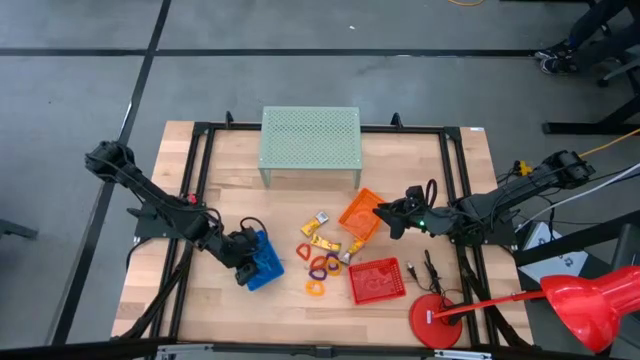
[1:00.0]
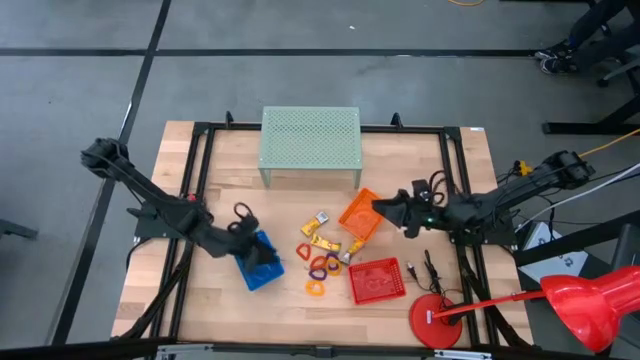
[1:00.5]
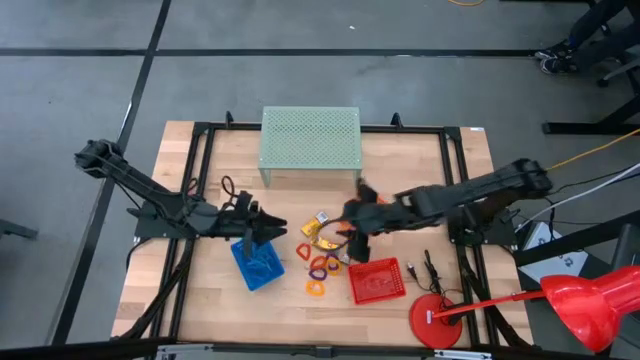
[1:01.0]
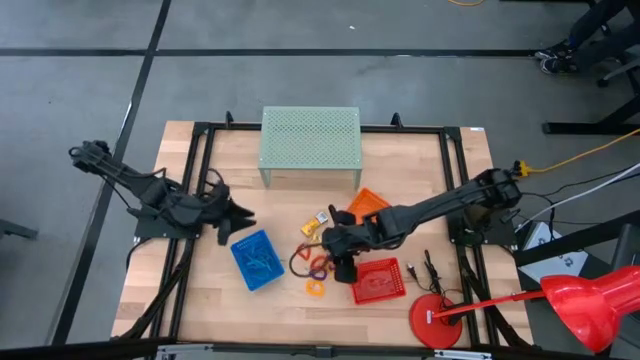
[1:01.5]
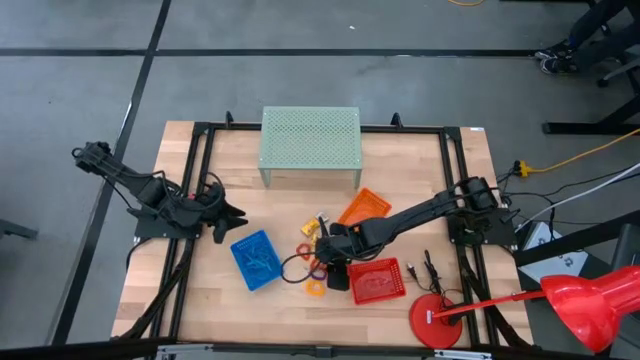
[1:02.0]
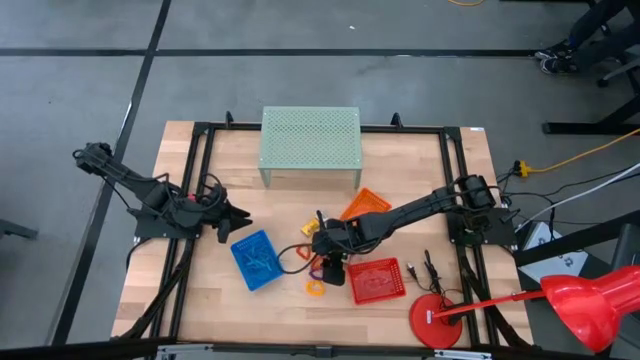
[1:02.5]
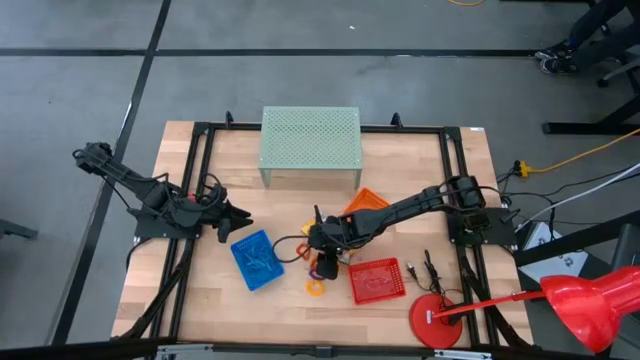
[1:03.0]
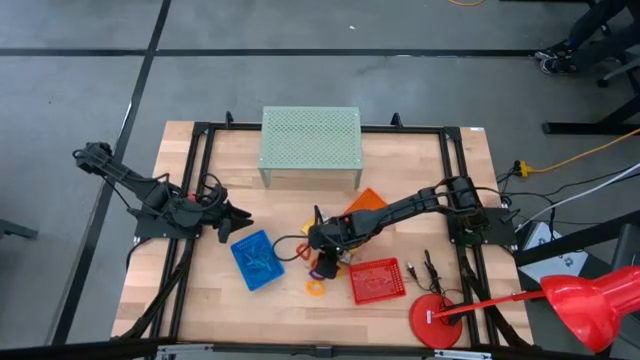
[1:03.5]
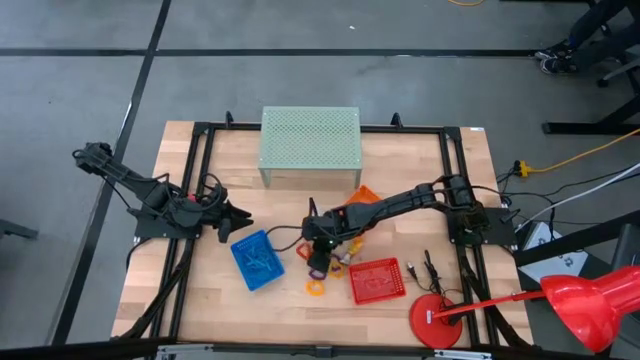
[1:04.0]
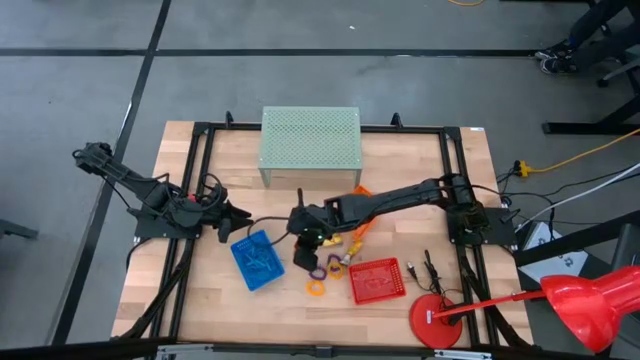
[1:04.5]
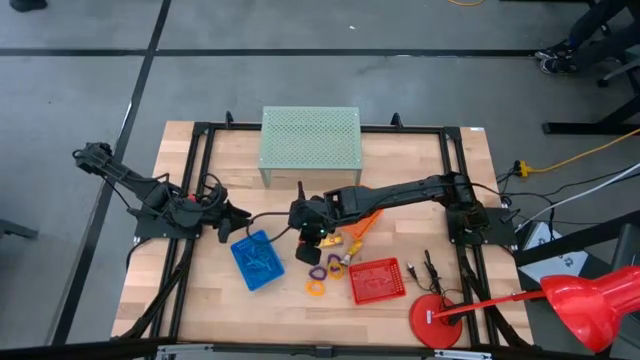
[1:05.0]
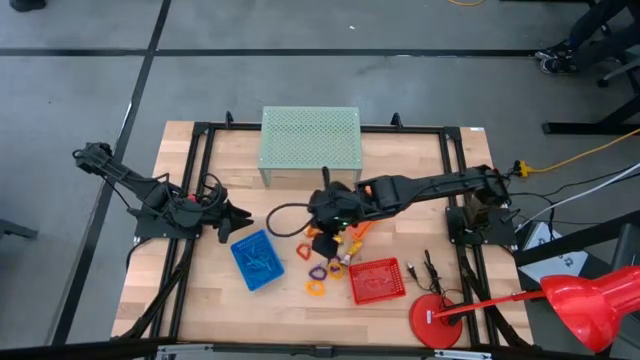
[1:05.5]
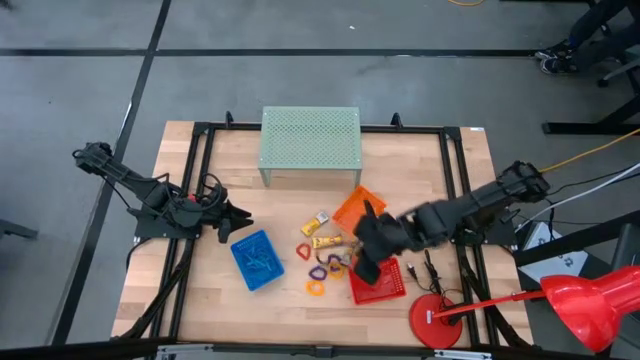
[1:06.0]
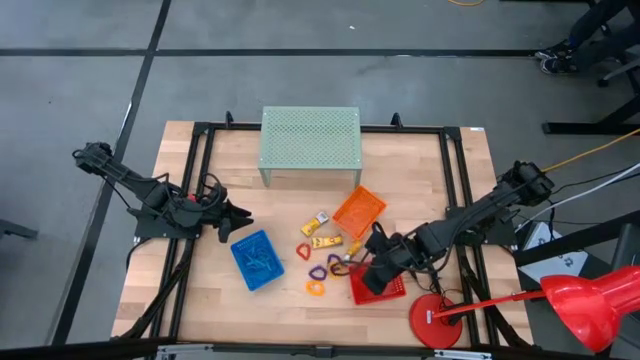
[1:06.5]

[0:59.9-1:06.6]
Task: Pick & Place Office Desk Supplies
Put the red spring keychain into the red bin

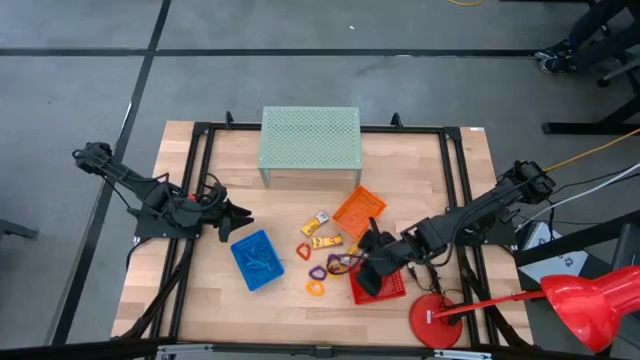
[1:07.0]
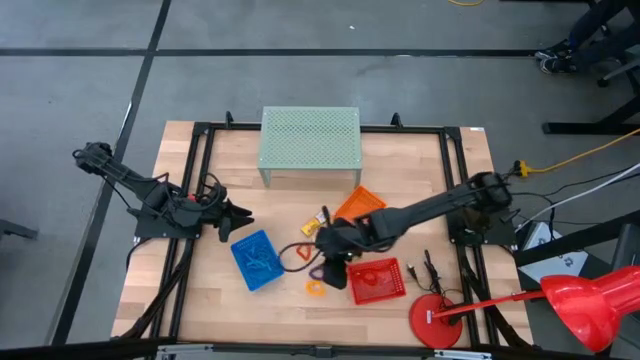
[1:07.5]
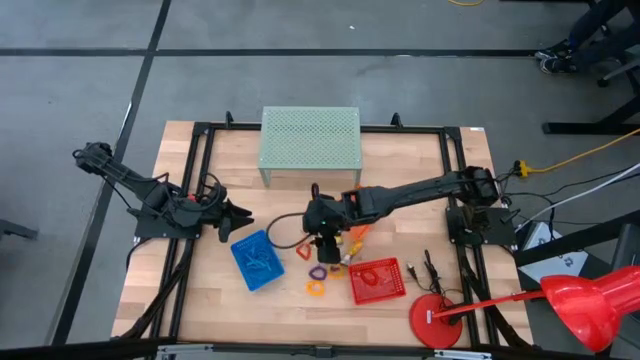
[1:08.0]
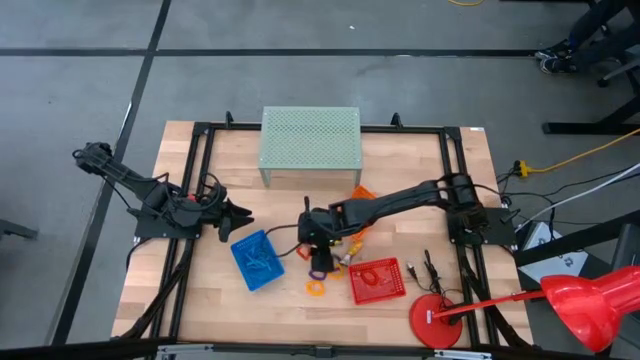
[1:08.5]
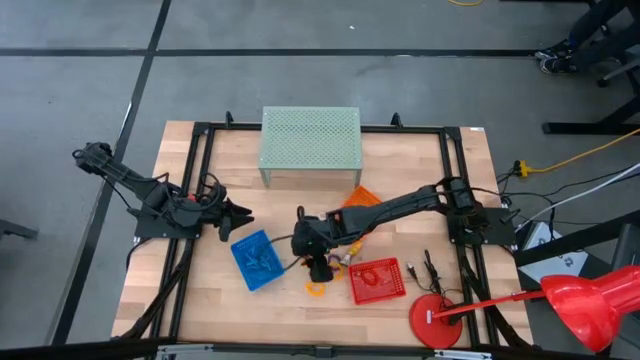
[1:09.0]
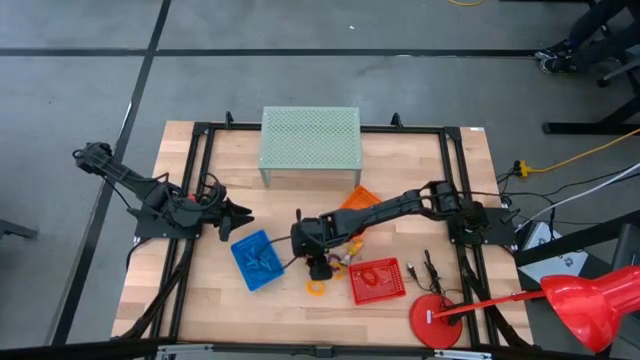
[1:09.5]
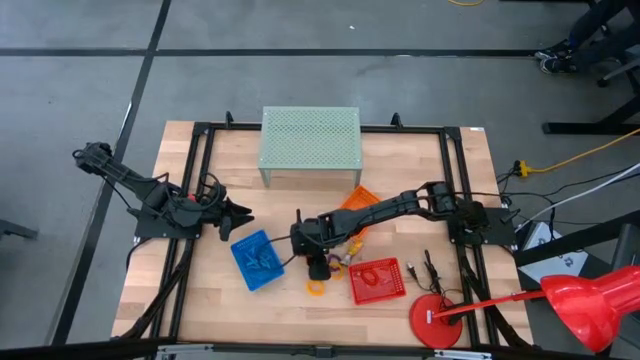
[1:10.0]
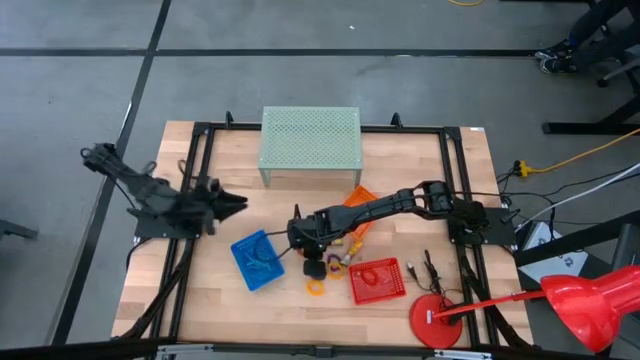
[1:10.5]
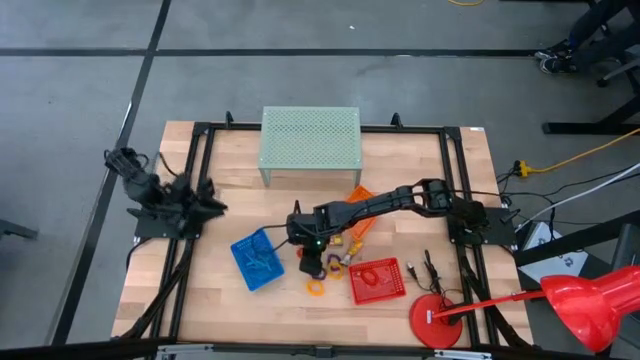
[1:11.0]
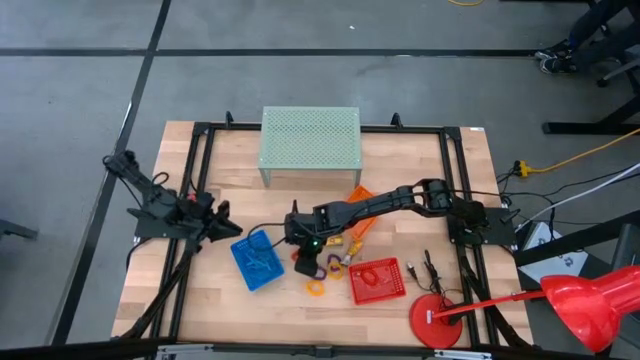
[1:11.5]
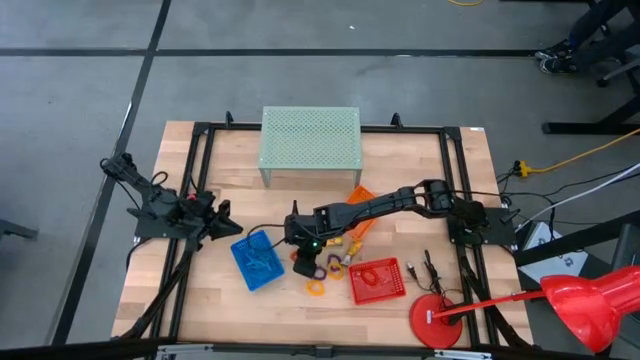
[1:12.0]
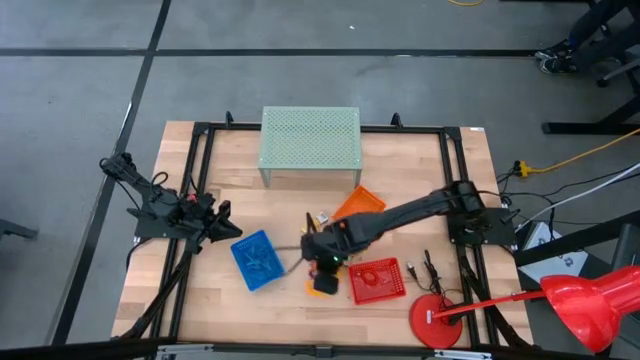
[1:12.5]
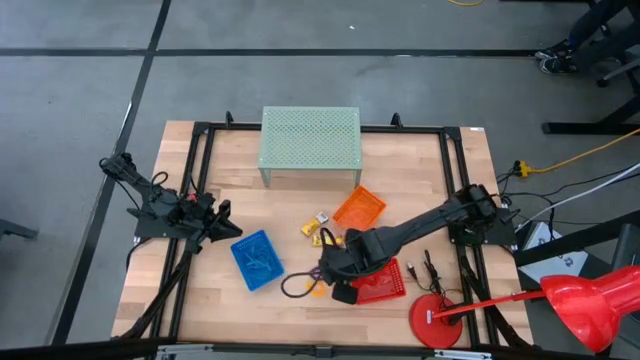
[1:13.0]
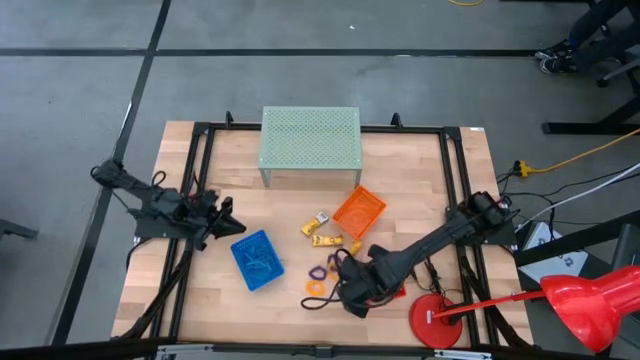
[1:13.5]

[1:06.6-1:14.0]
Put the red spring keychain into the red bin

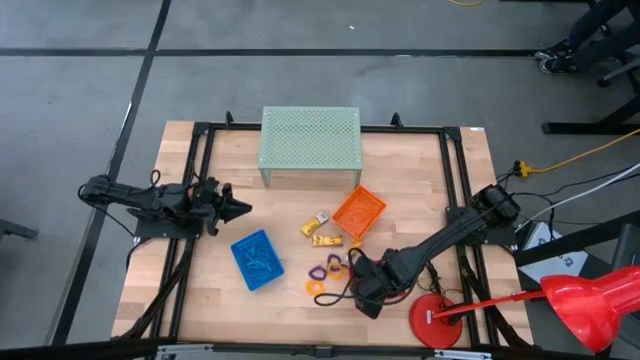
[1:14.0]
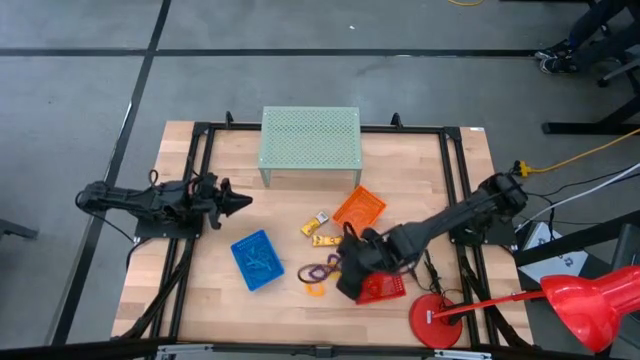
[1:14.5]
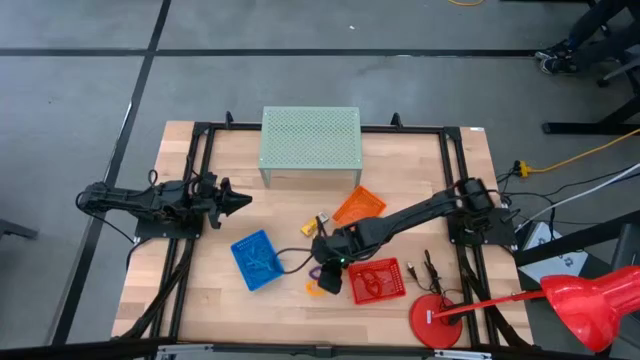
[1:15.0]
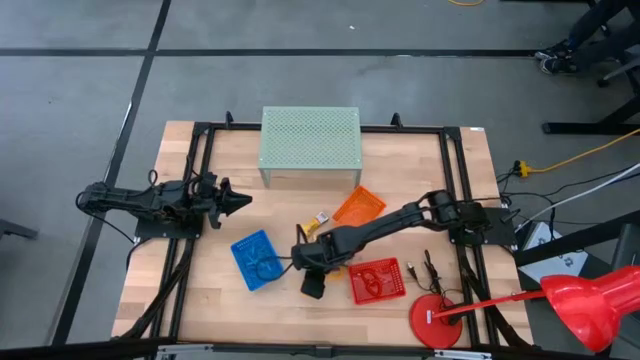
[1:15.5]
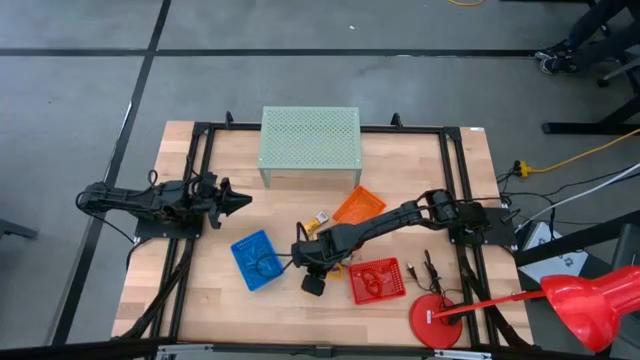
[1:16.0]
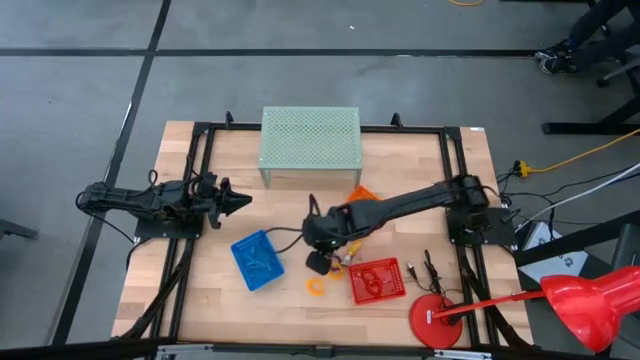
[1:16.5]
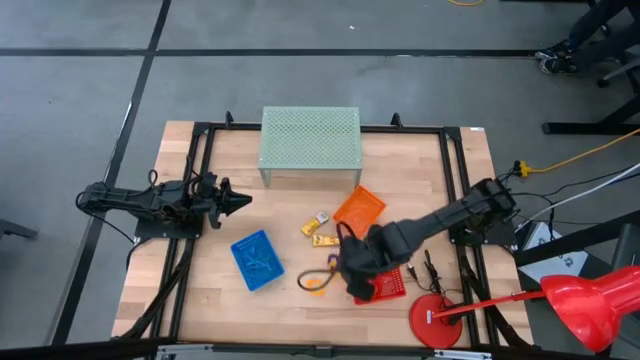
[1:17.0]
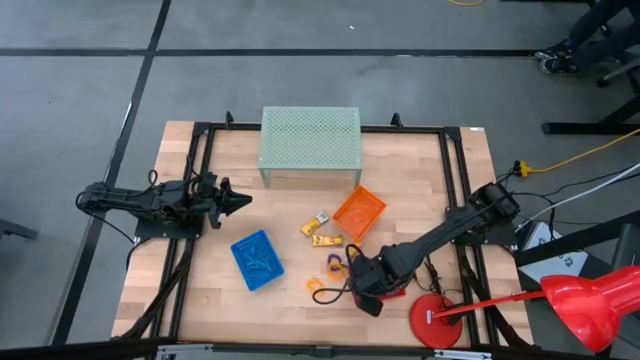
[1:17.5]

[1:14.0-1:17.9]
Put the violet spring keychain into the red bin

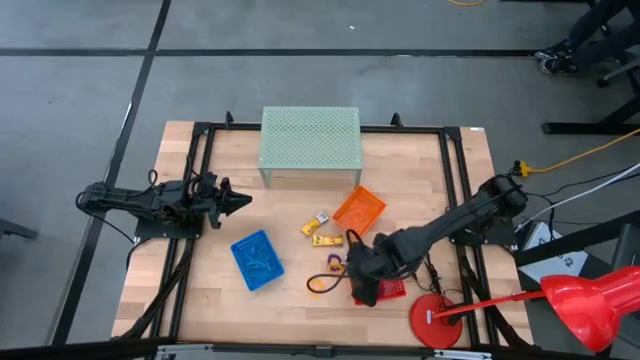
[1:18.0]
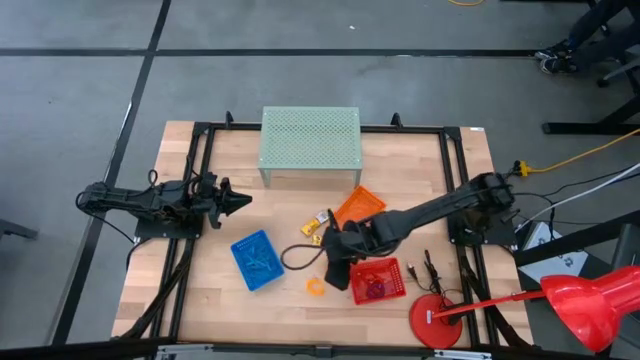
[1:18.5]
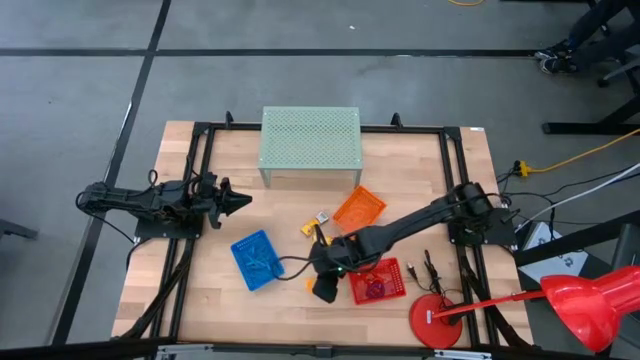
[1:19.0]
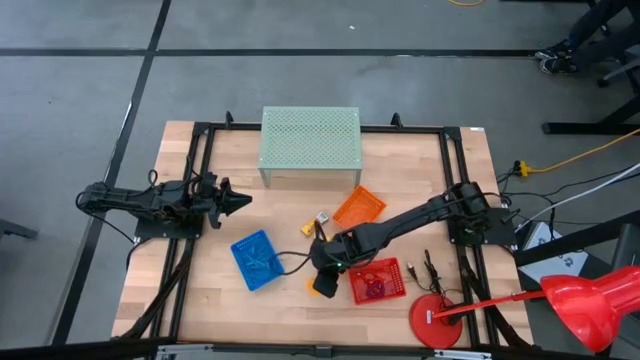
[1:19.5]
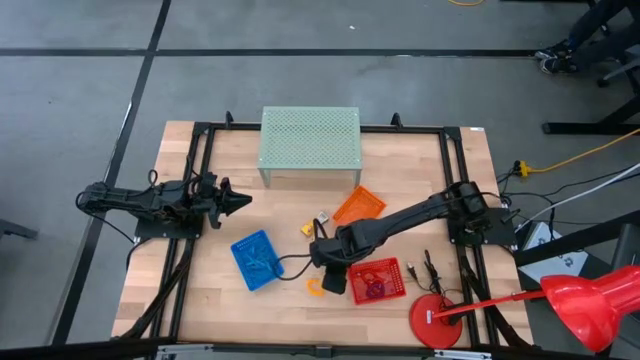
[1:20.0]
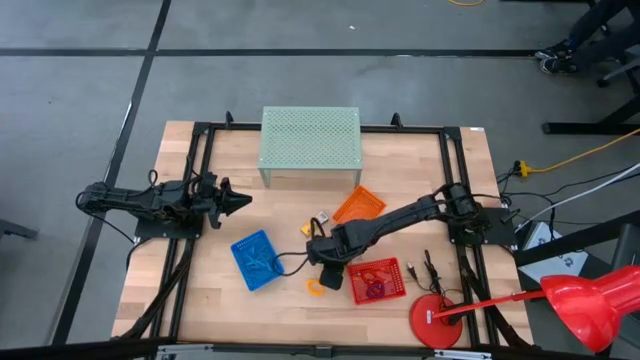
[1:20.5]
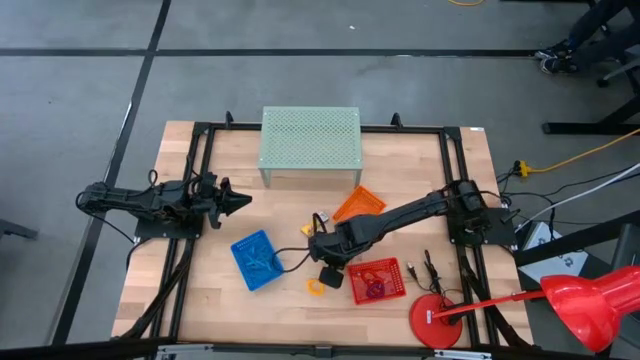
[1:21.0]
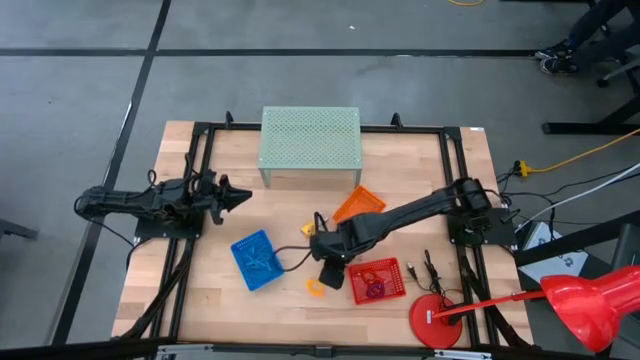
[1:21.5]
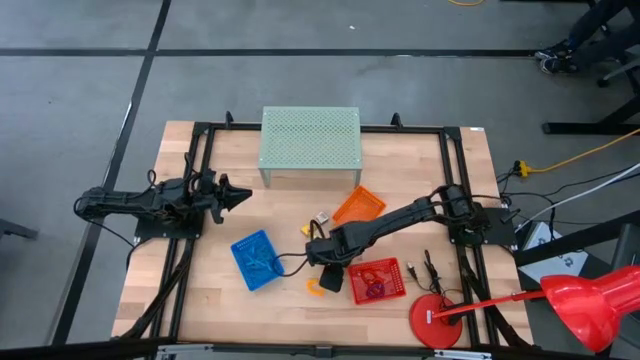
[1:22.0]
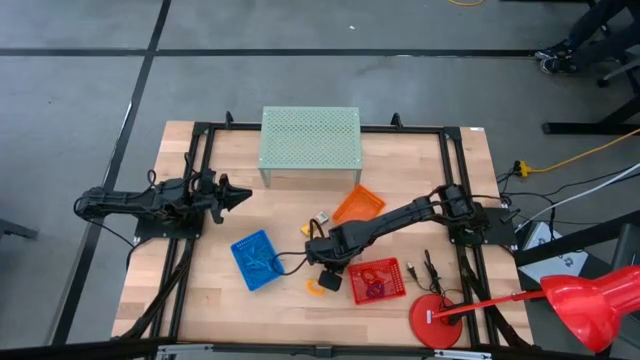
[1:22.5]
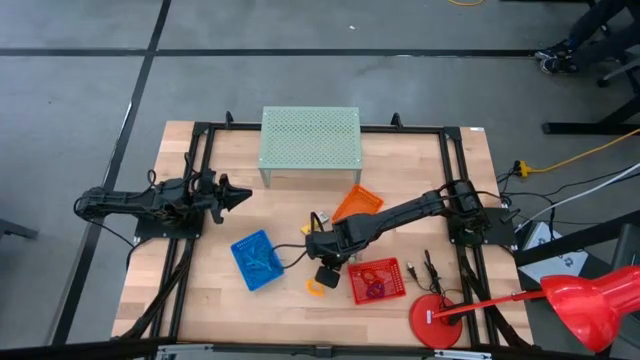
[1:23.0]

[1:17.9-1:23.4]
Put the violet spring keychain into the red bin
